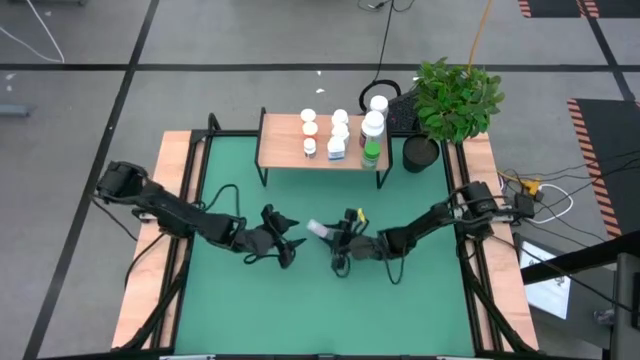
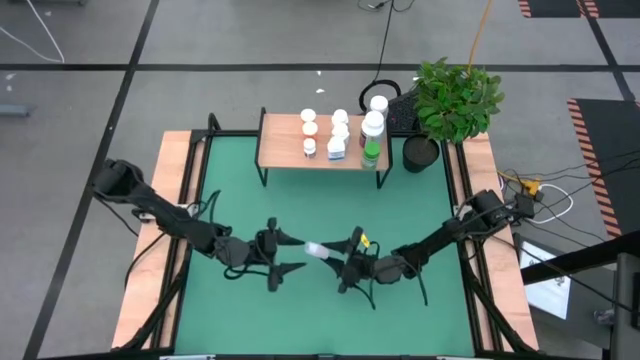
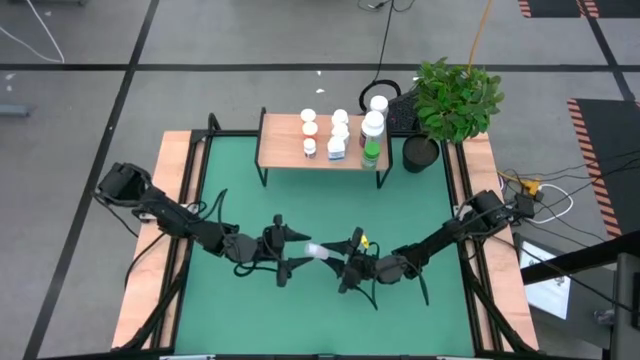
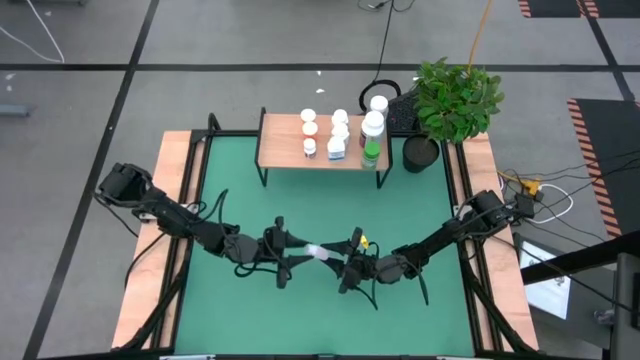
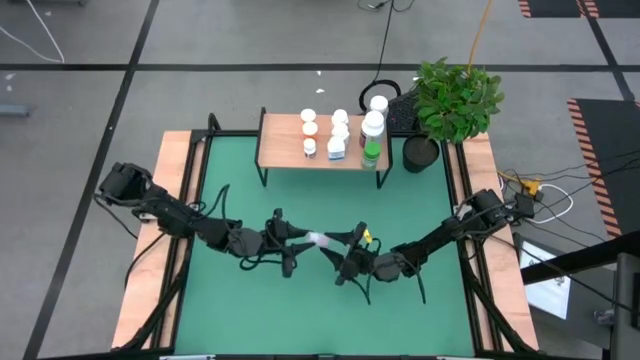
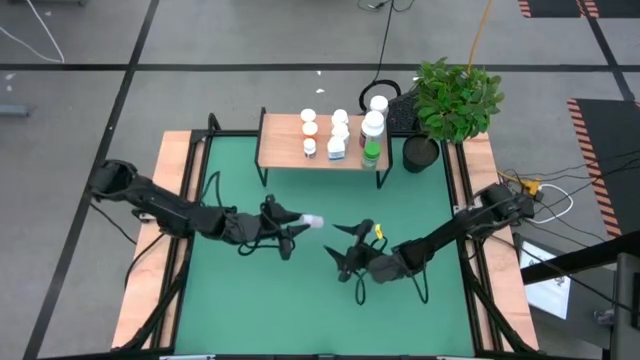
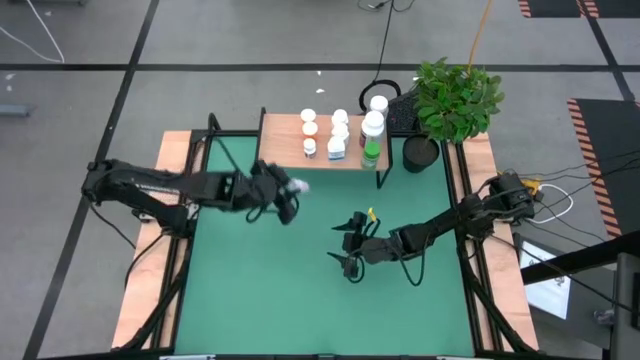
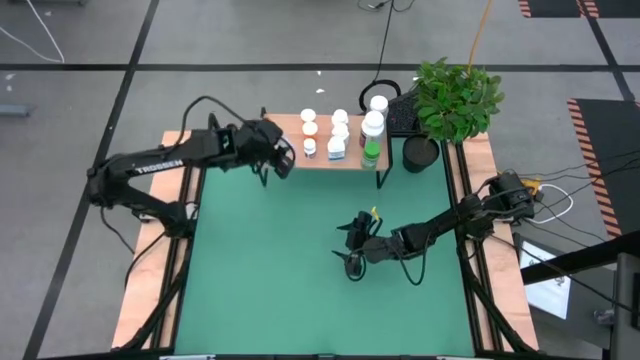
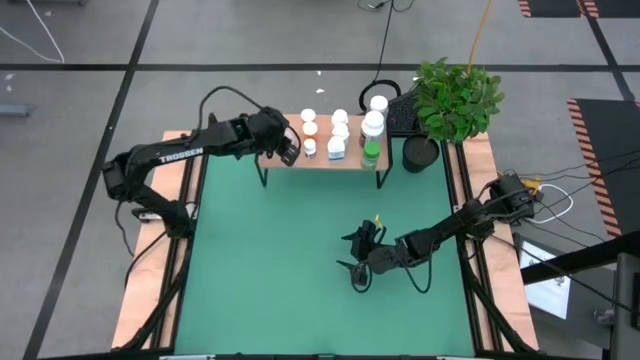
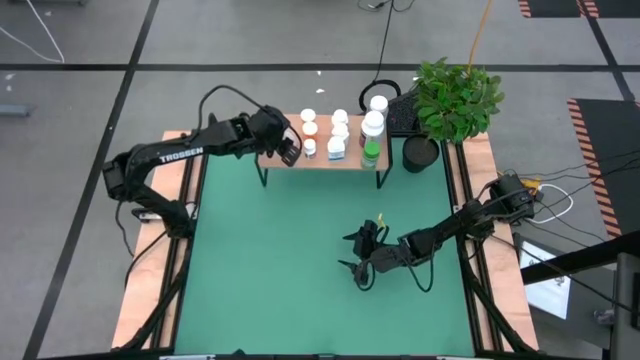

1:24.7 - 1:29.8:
Task: Pick and place medicine bottles onto shelf by color
Put the small transparent pill bottle on the shelf

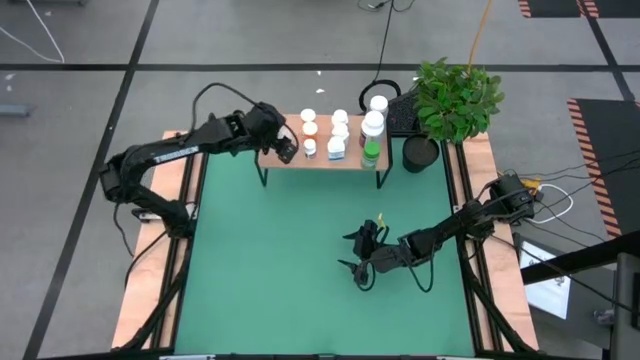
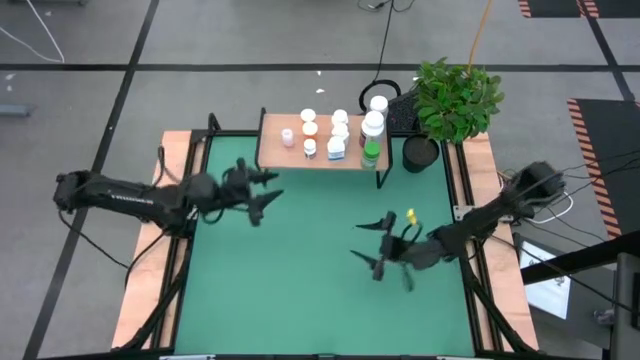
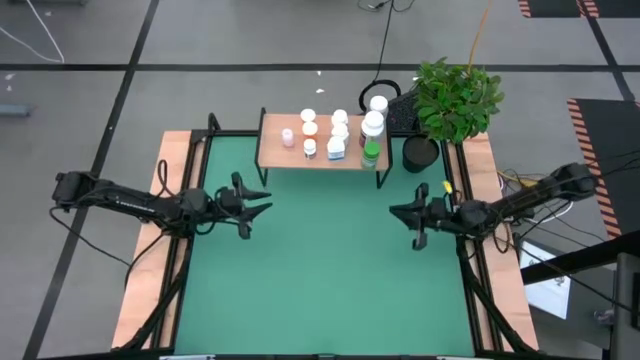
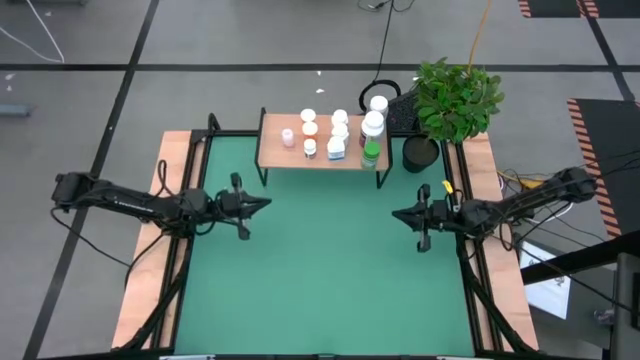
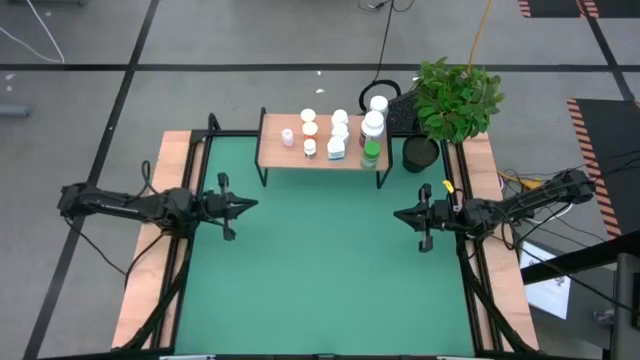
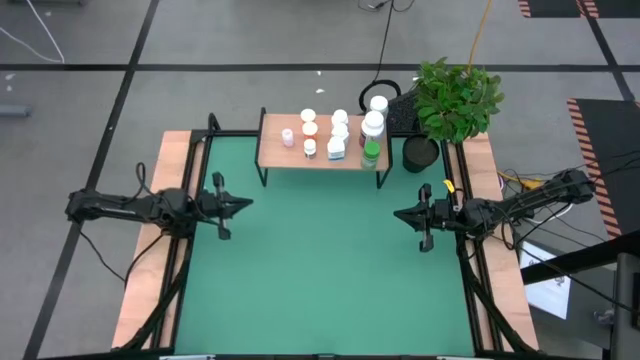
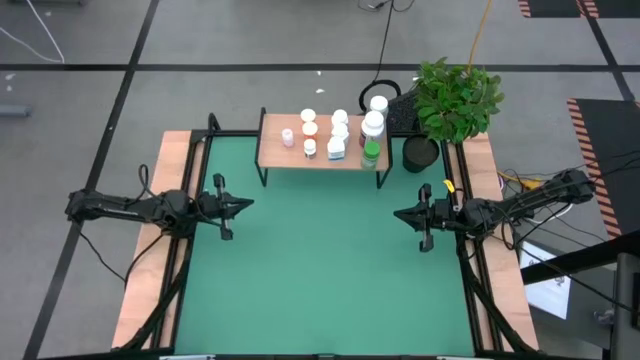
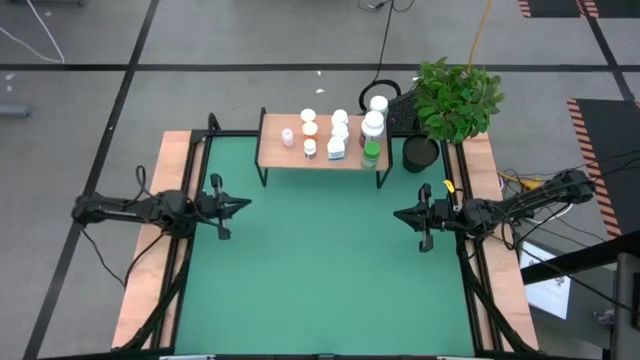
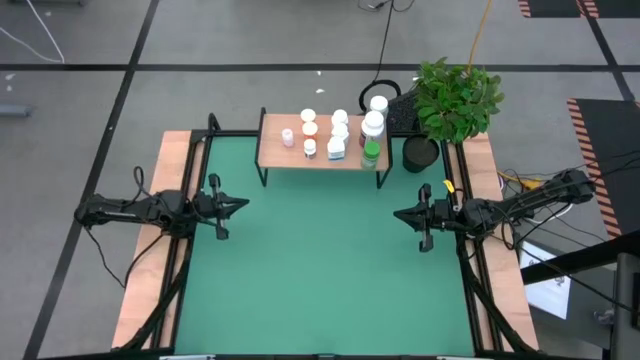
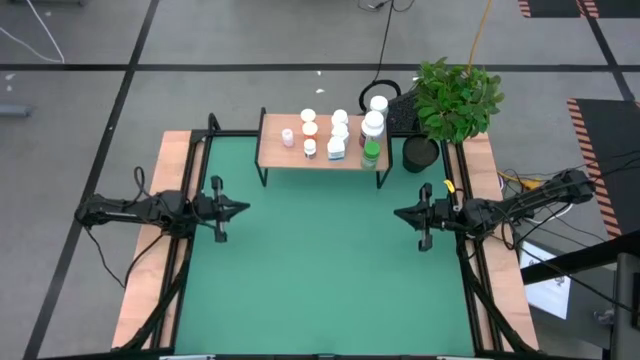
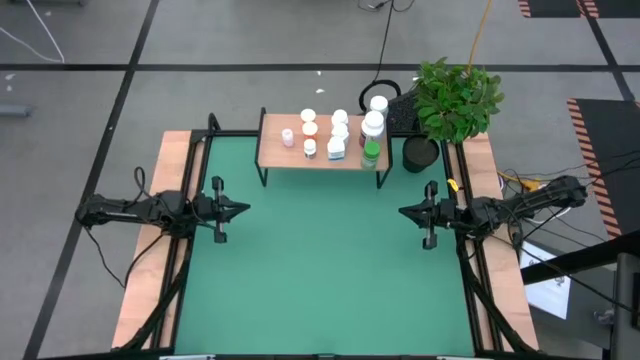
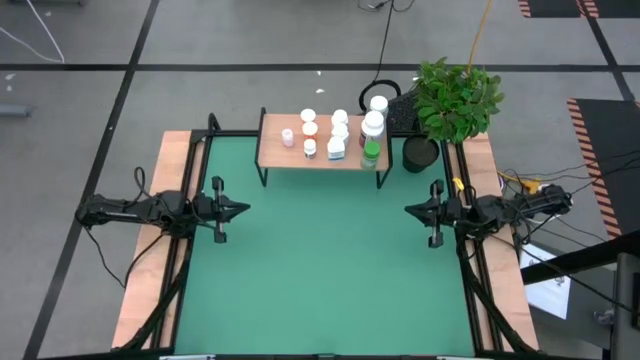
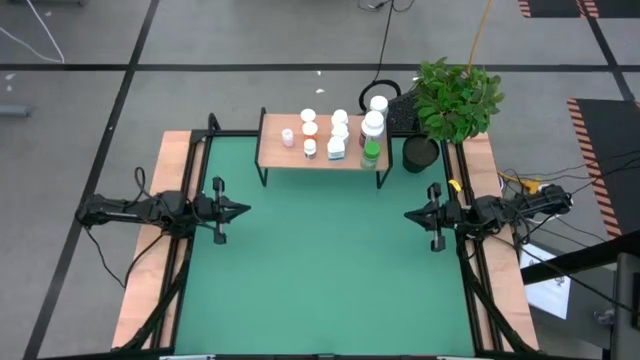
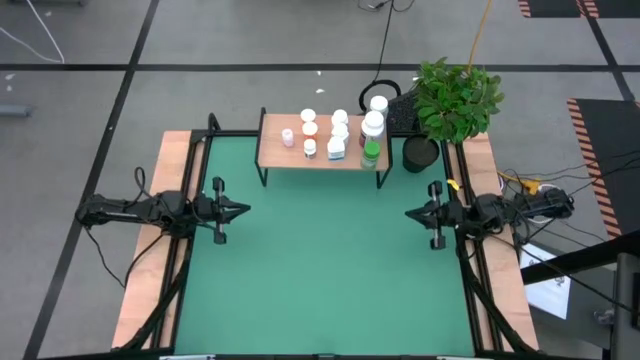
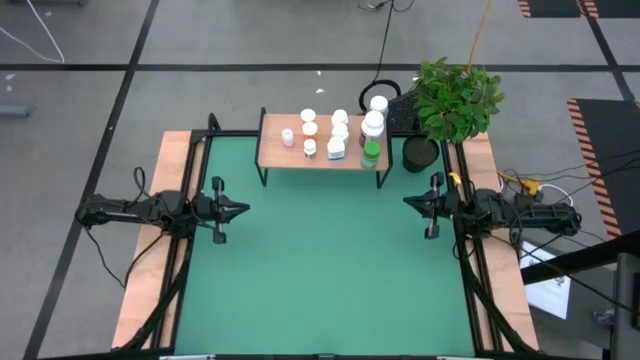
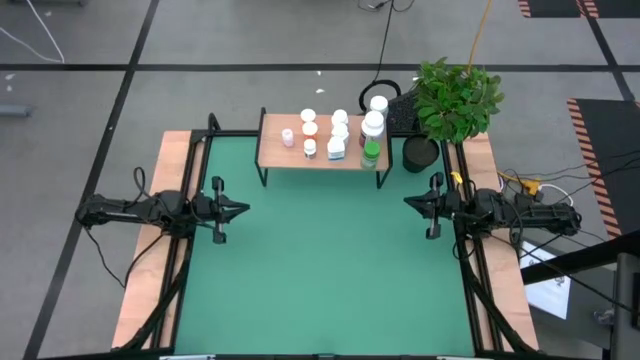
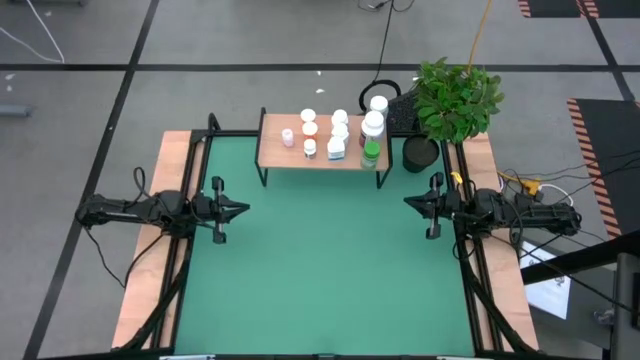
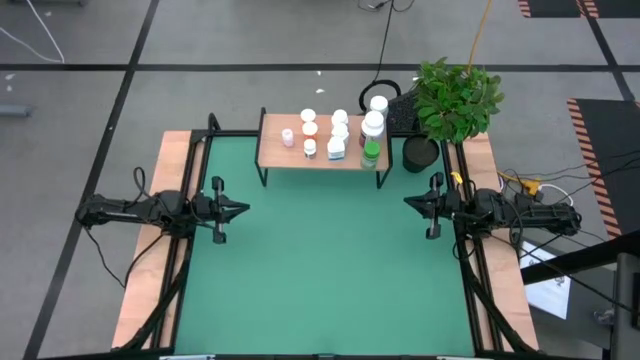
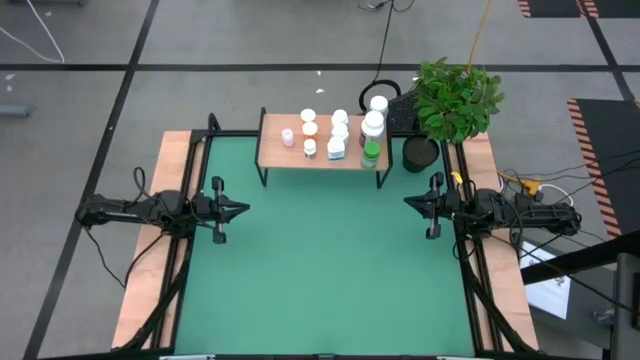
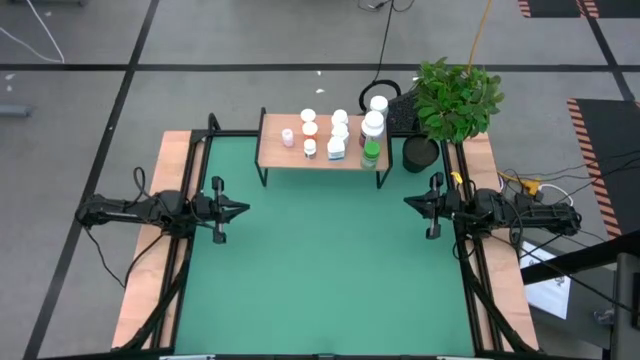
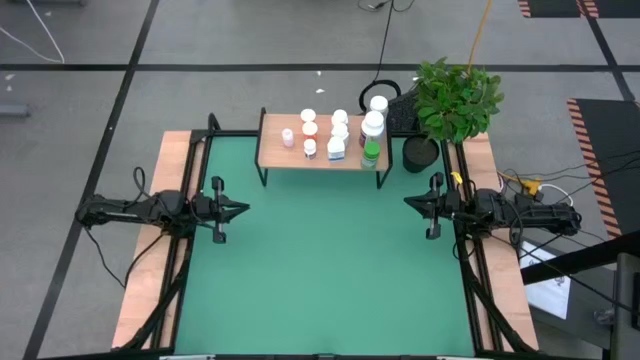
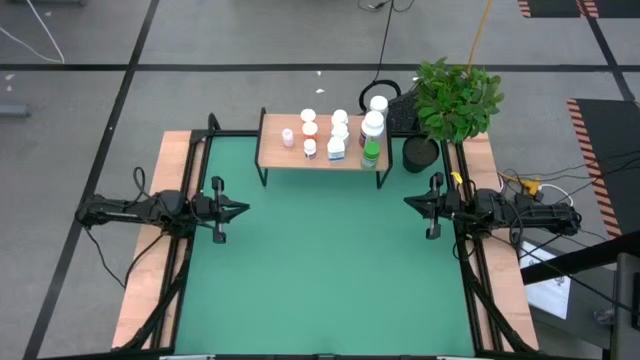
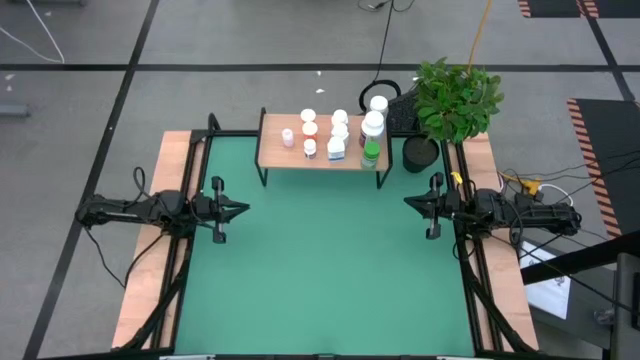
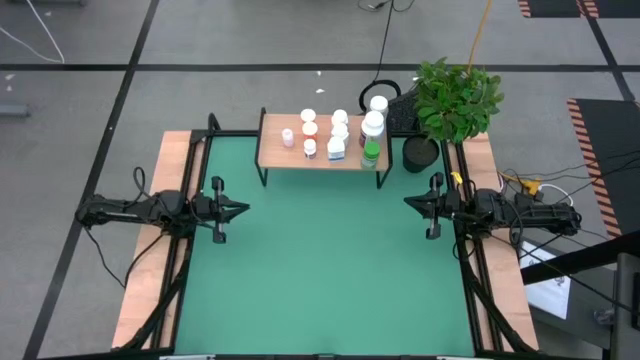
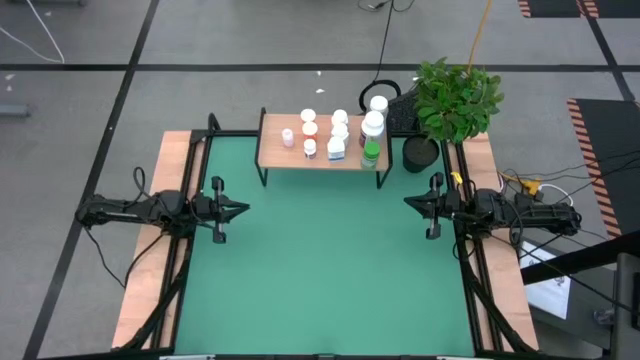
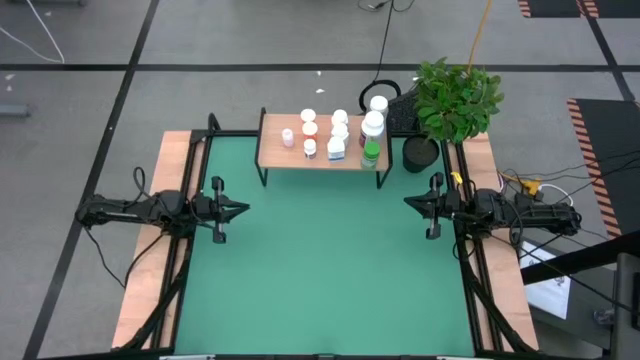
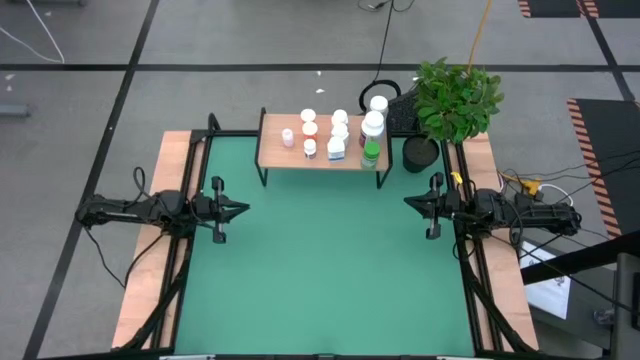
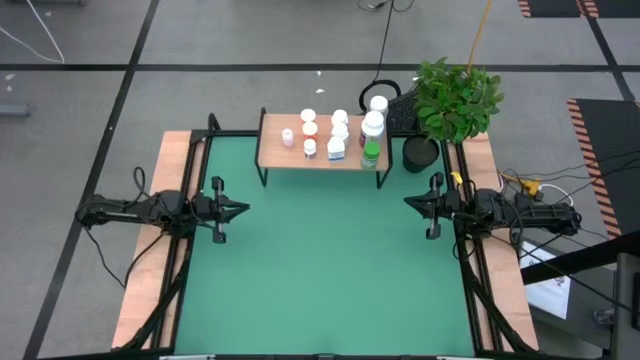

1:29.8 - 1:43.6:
Return to Home Position

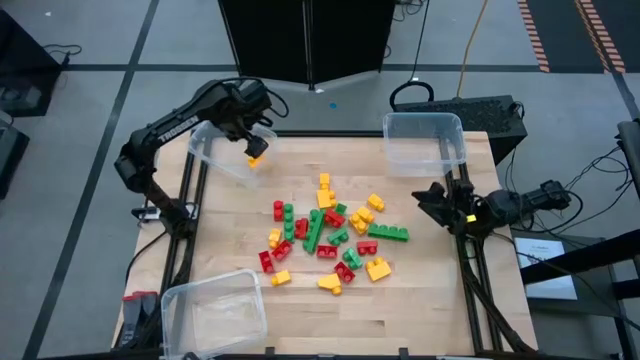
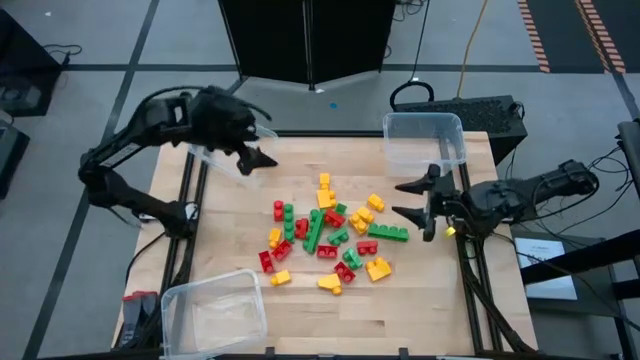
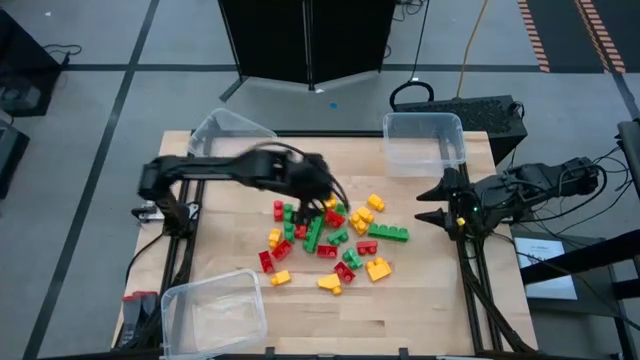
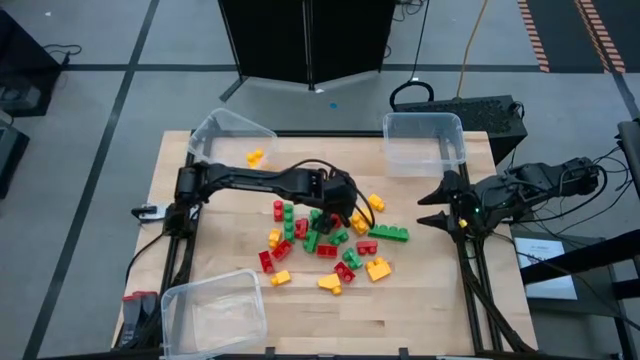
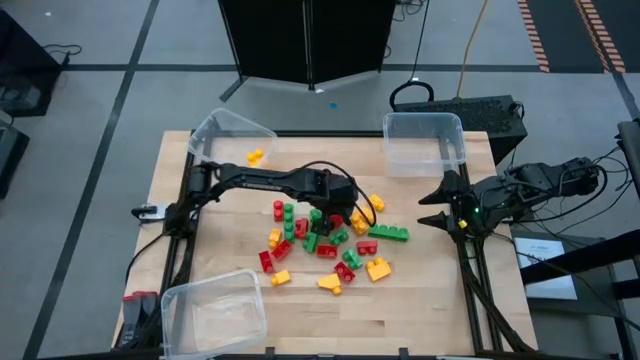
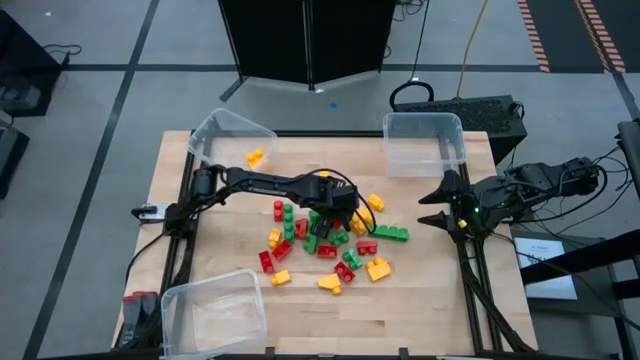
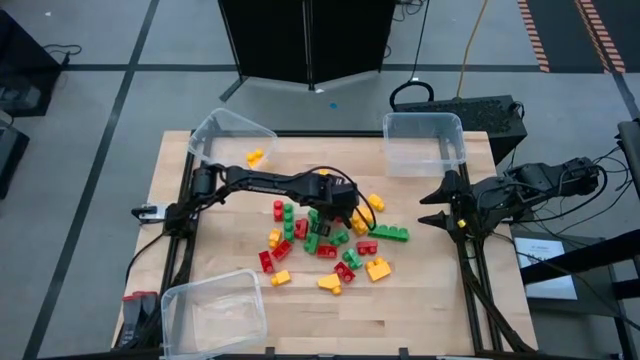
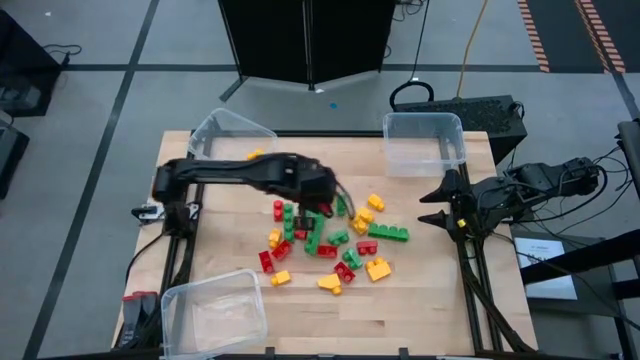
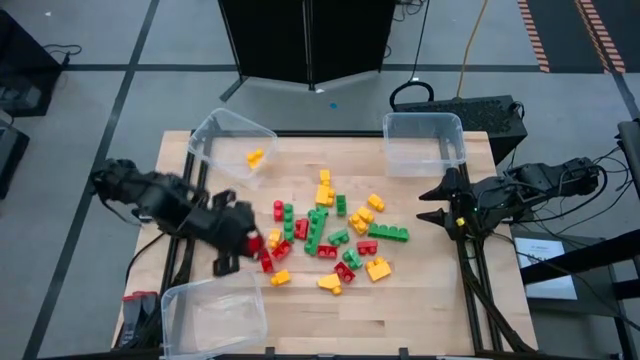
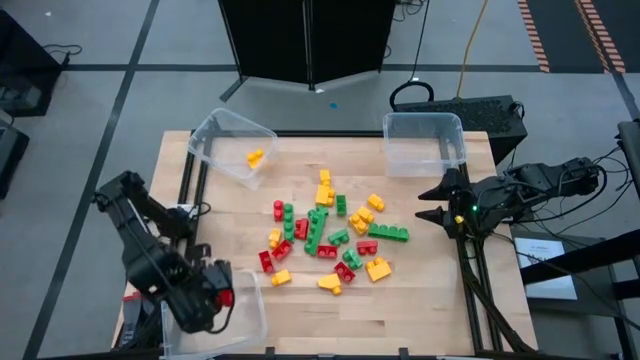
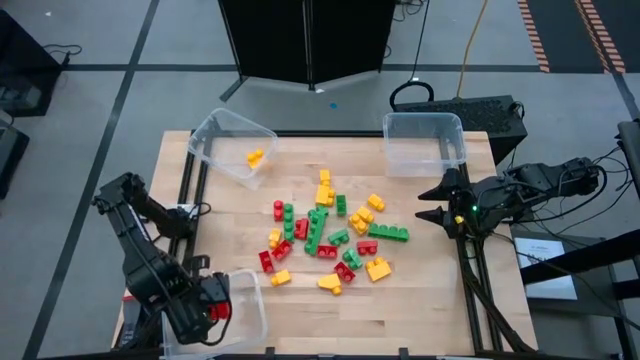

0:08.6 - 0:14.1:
Task: Sort blocks
Put the red game piece into the bottom transparent bin
